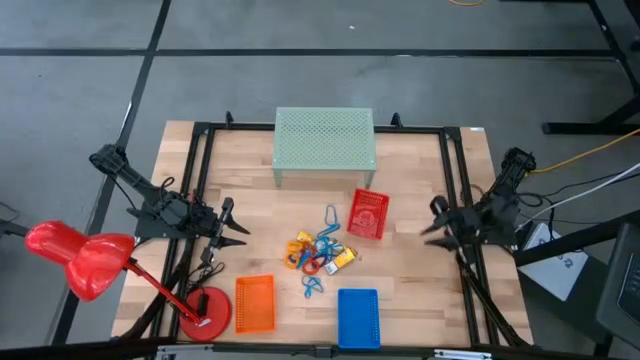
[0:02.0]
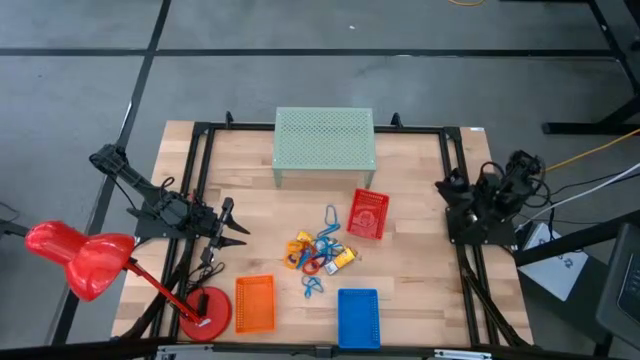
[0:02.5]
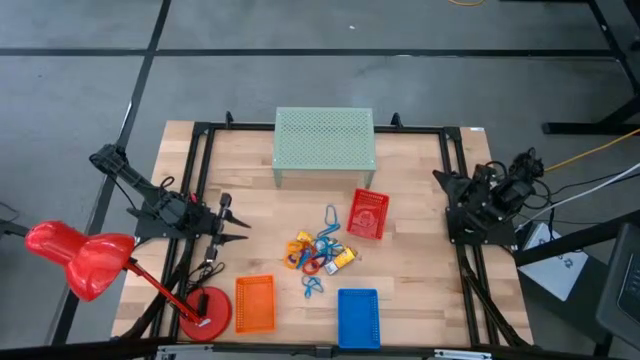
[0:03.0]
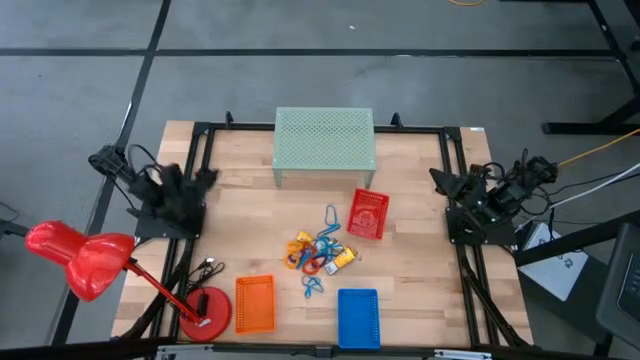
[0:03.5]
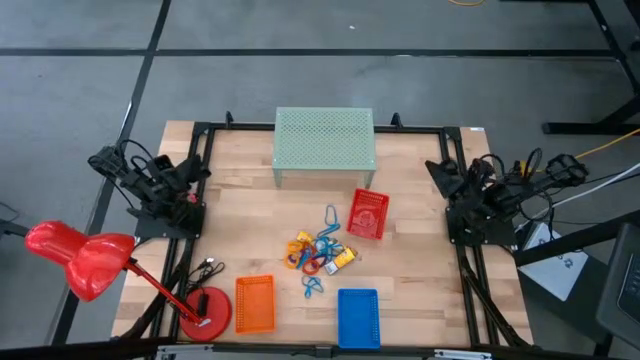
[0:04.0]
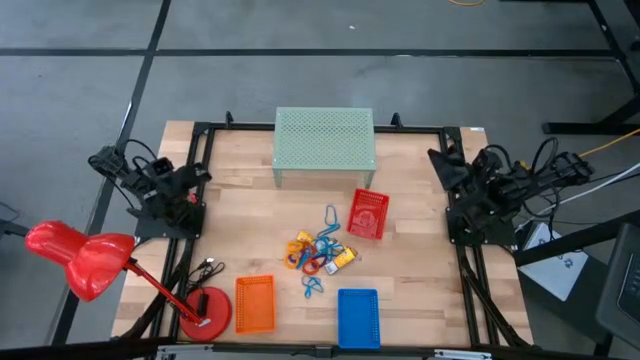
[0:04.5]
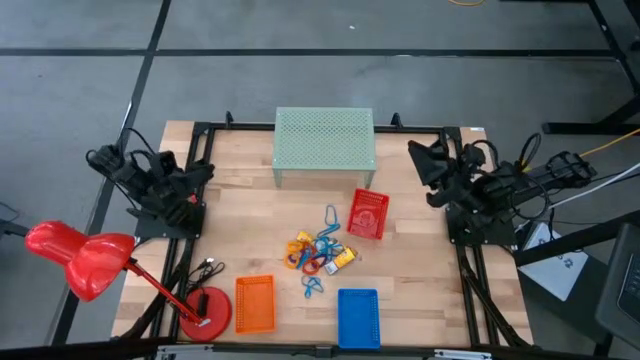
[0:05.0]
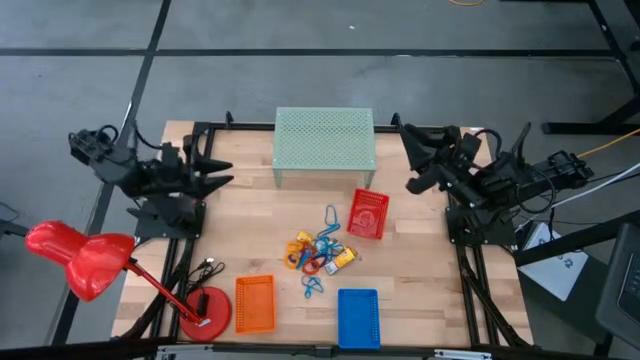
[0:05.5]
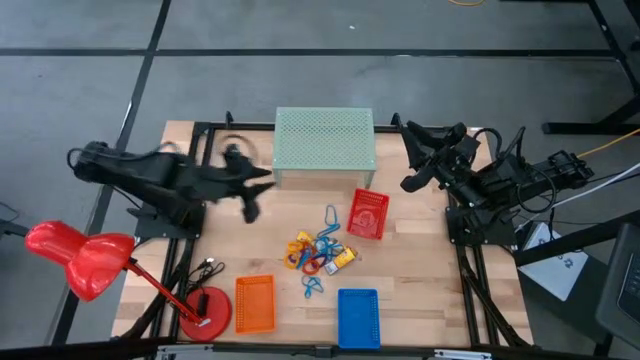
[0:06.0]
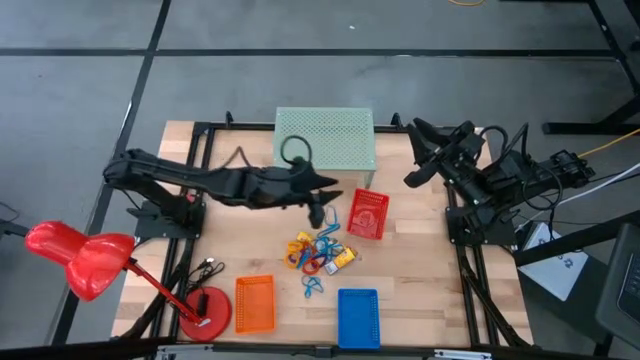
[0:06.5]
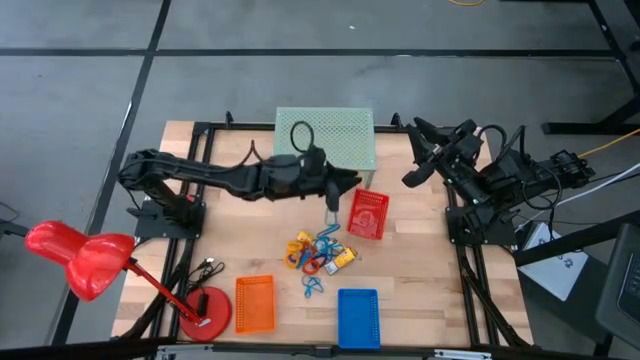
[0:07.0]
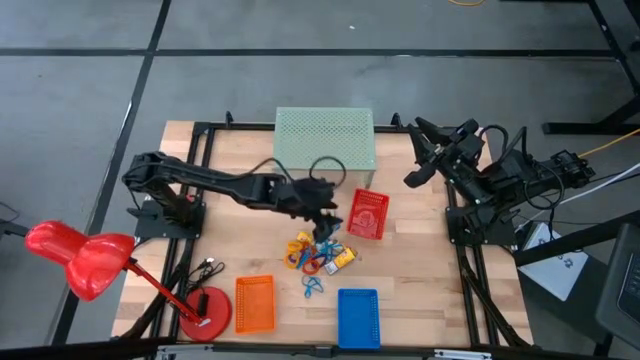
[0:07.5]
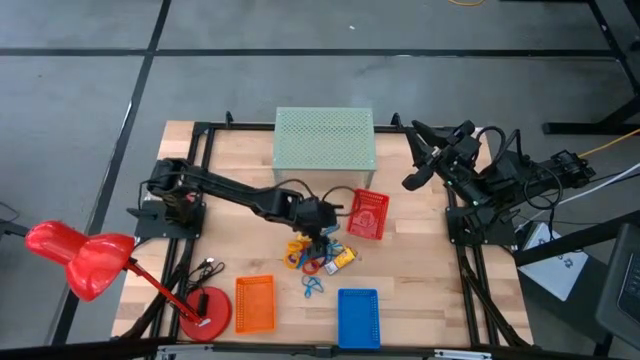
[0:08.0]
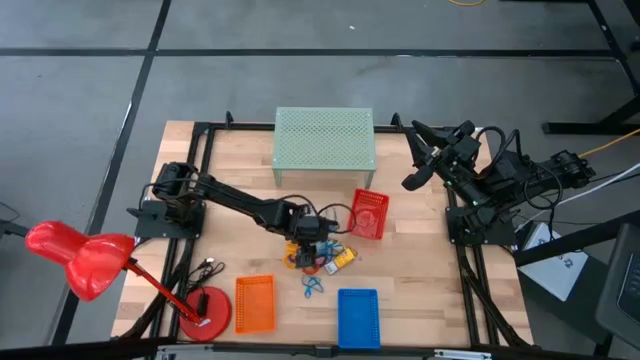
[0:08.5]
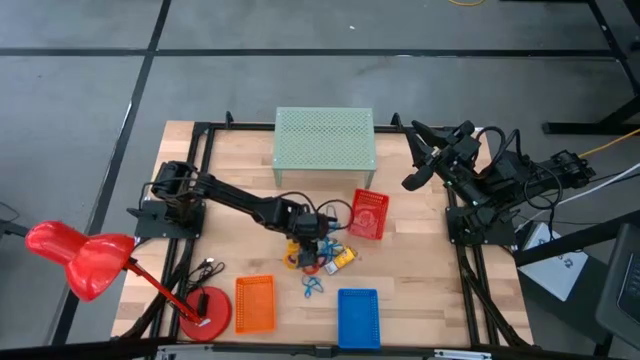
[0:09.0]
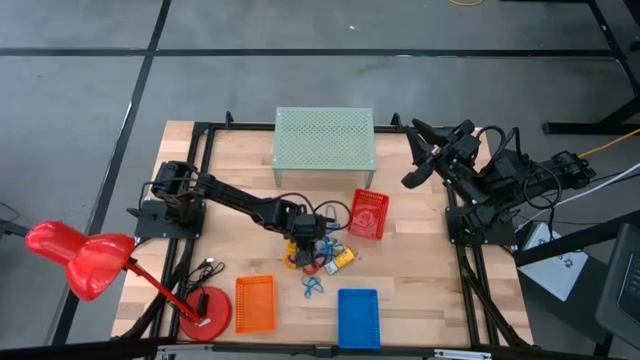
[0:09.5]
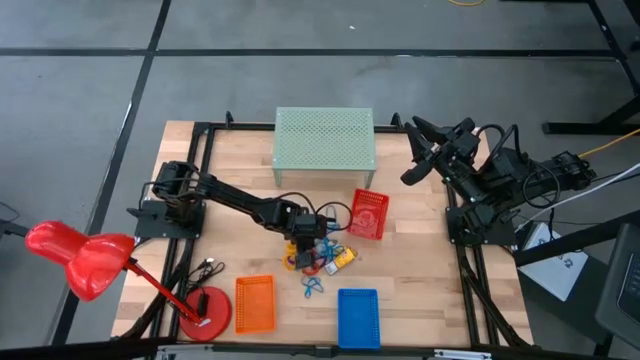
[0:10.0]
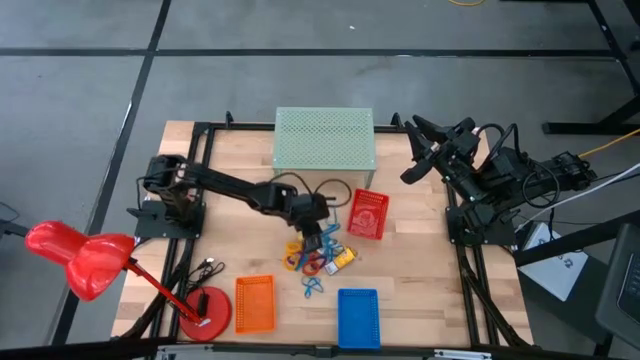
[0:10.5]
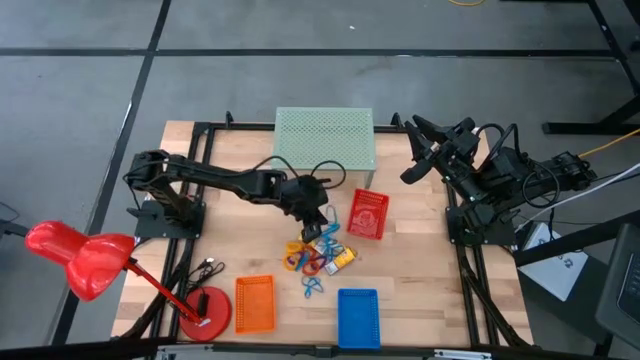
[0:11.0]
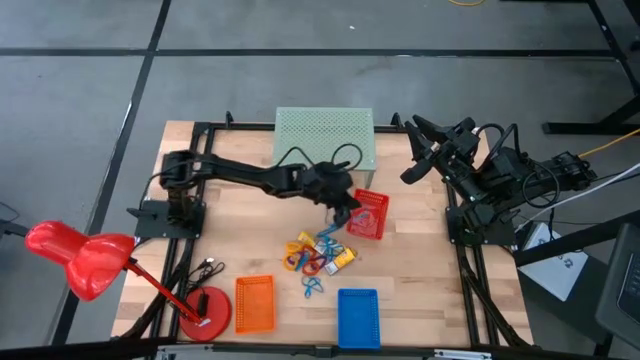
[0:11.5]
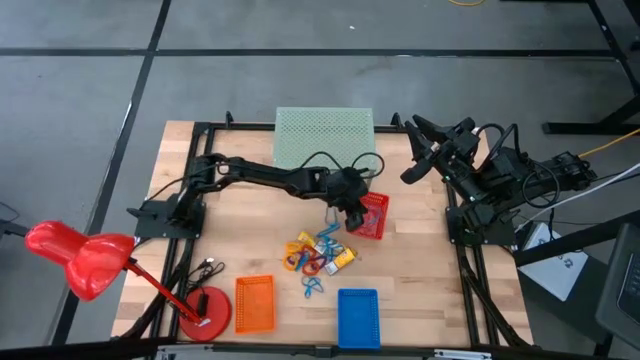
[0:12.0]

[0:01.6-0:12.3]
Task: Pick & Place Office Desk Supplies
Put the blue rubber band into the red basket

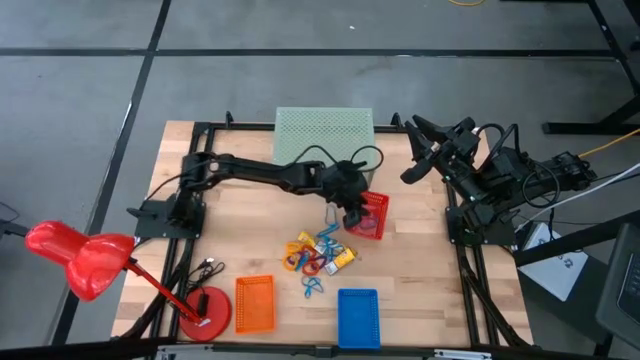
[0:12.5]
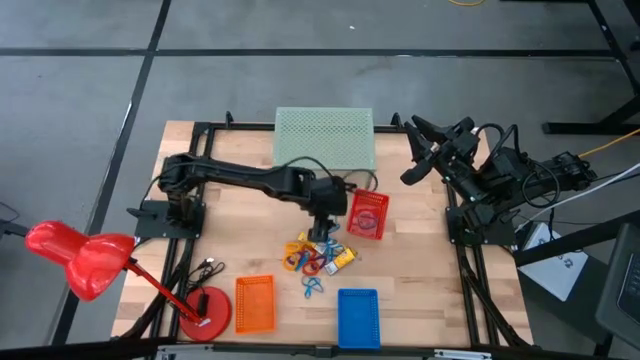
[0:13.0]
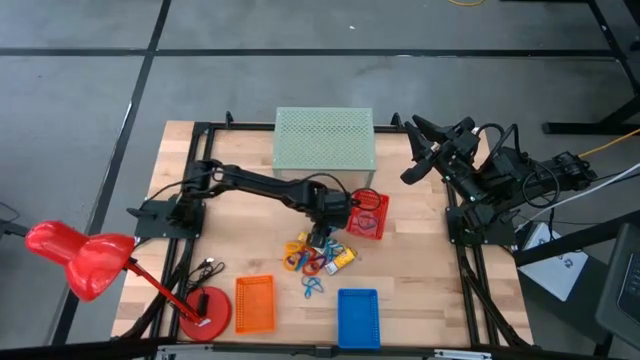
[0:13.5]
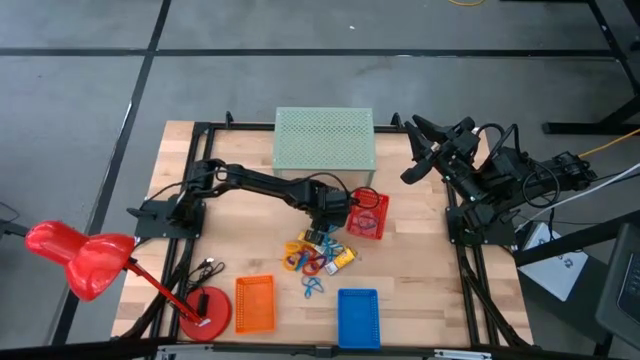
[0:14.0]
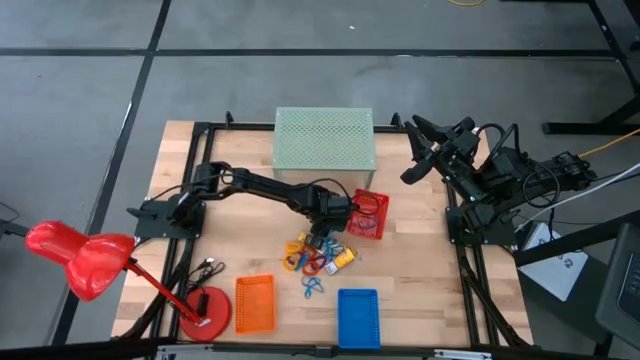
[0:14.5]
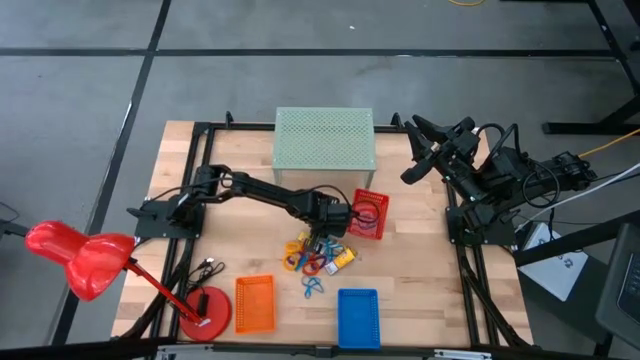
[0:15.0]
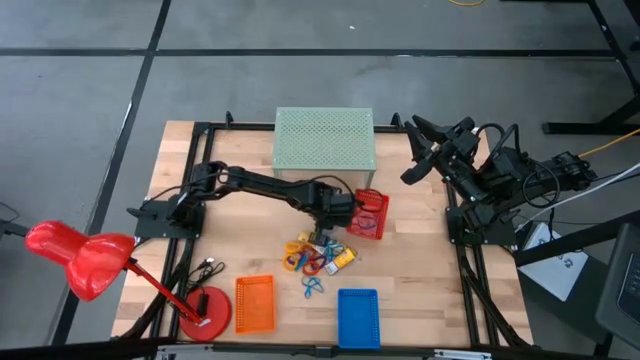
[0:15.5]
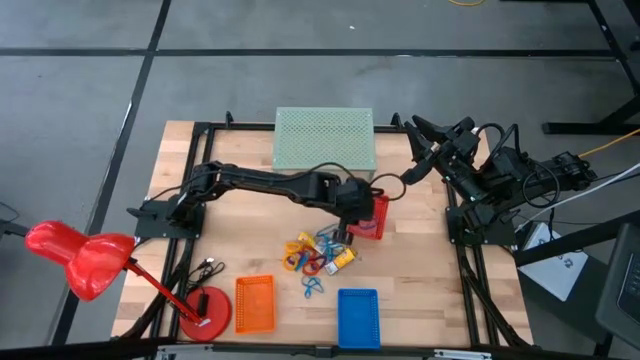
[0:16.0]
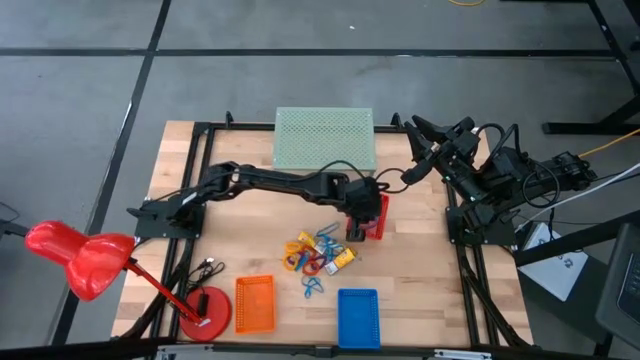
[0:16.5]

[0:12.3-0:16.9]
Put the blue rubber band into the red basket

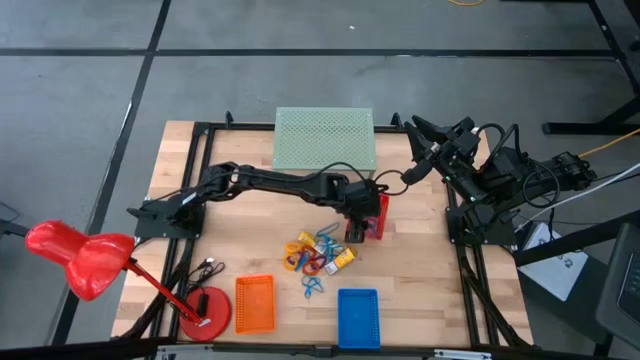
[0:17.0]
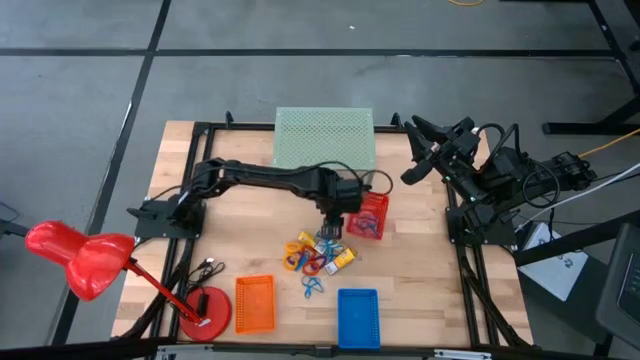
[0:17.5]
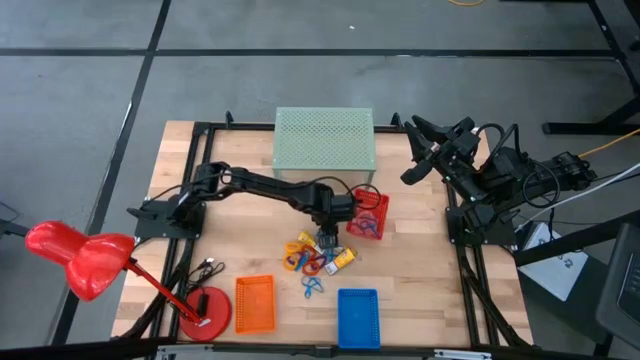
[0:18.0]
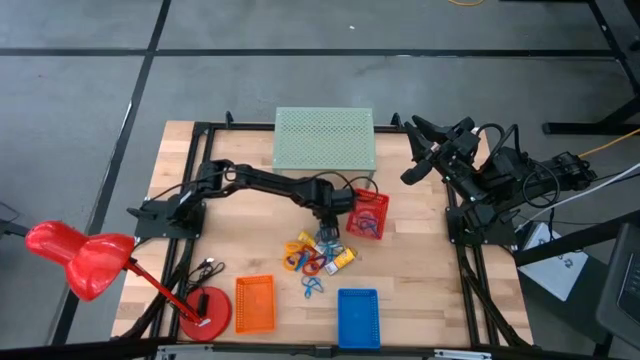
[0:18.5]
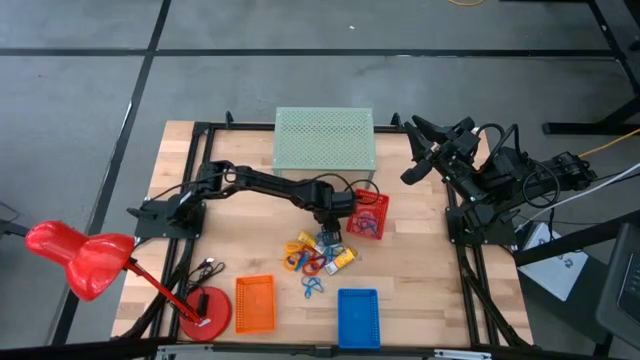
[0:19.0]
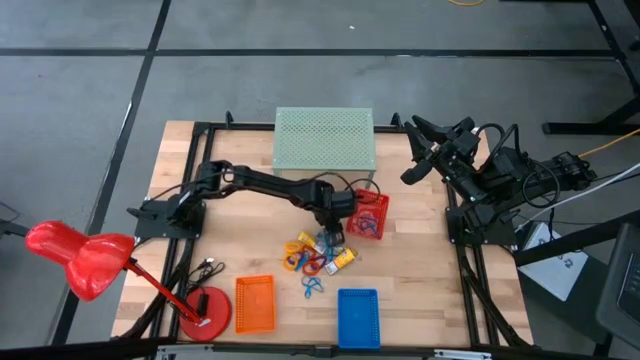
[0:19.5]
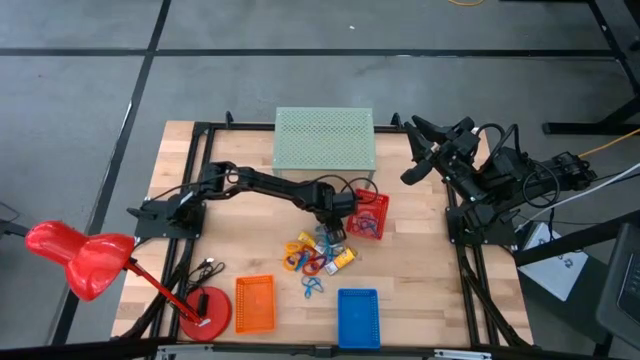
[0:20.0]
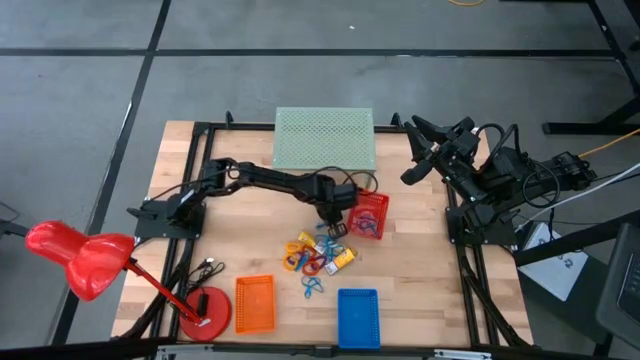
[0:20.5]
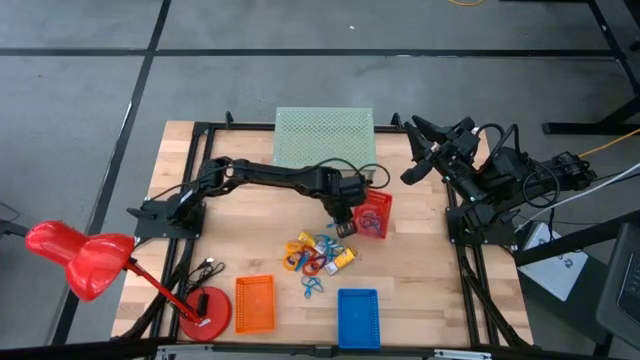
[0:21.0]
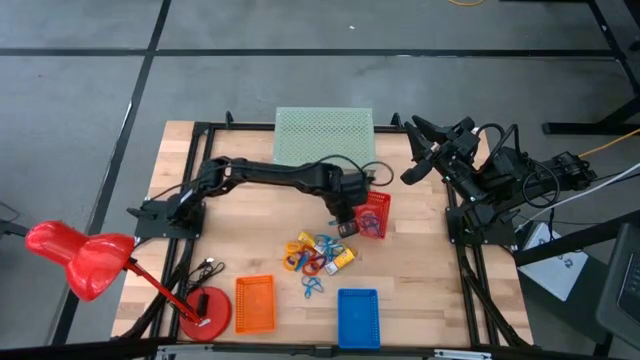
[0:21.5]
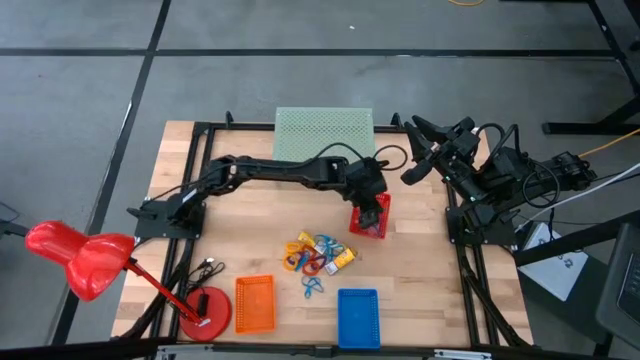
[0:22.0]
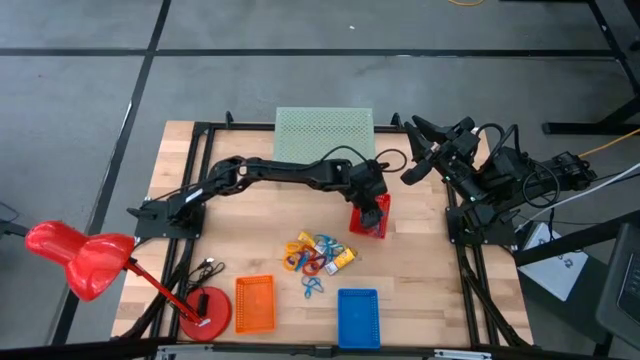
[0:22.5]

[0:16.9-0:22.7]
Put the blue rubber band into the red basket
